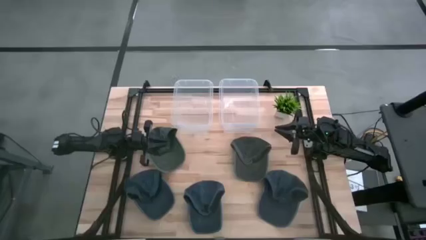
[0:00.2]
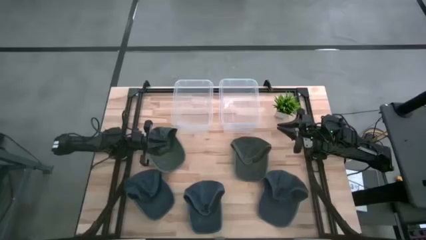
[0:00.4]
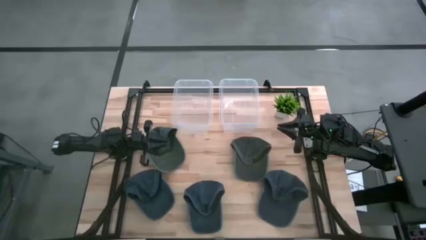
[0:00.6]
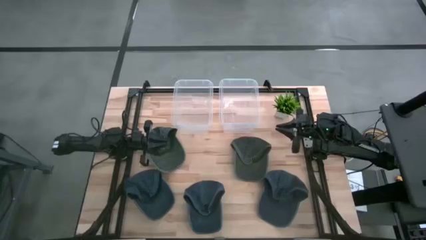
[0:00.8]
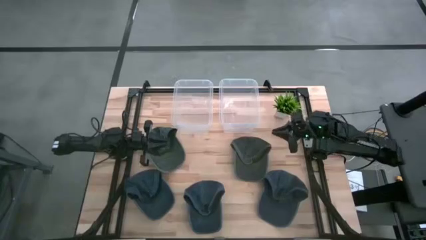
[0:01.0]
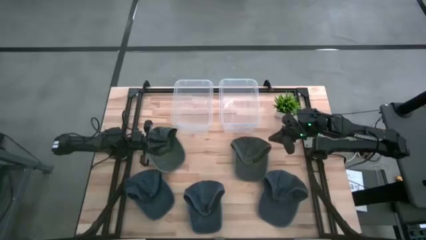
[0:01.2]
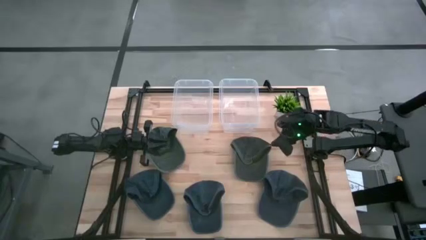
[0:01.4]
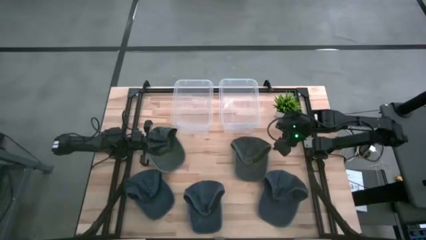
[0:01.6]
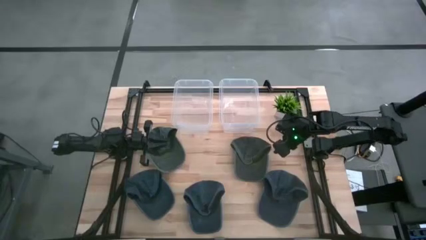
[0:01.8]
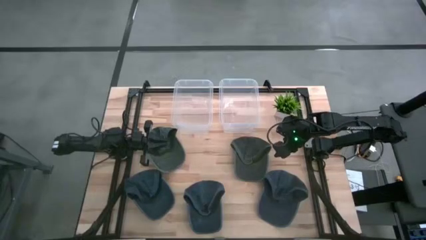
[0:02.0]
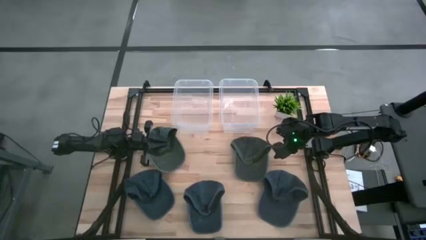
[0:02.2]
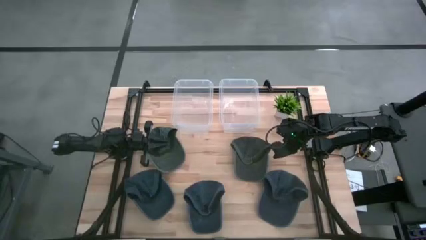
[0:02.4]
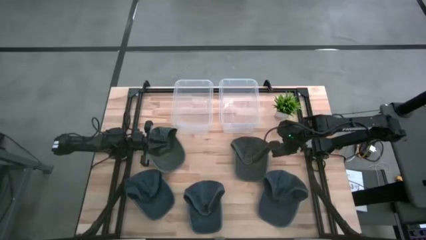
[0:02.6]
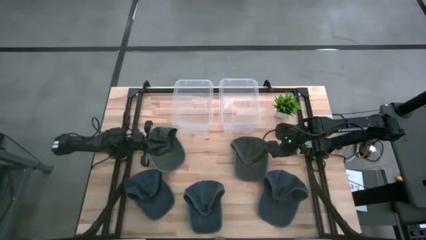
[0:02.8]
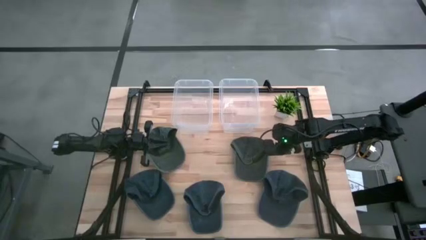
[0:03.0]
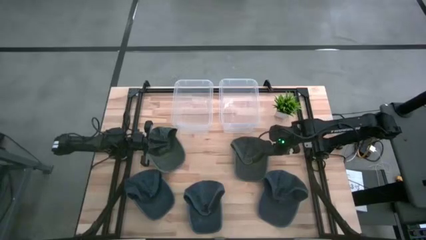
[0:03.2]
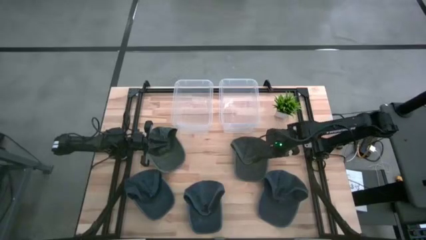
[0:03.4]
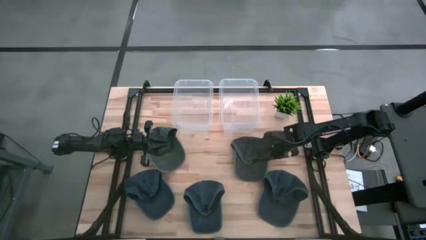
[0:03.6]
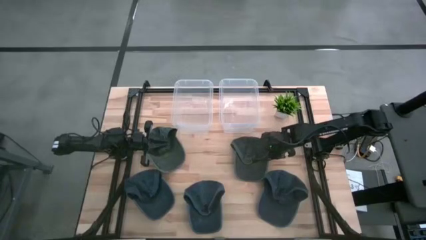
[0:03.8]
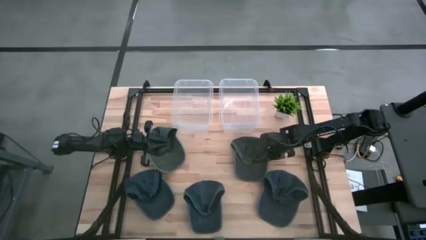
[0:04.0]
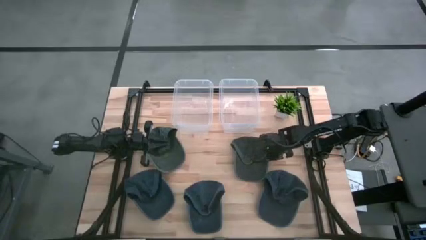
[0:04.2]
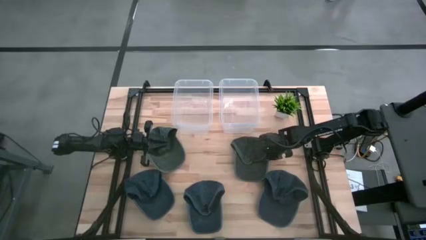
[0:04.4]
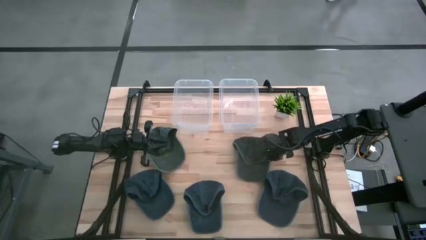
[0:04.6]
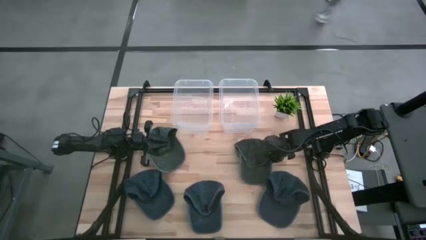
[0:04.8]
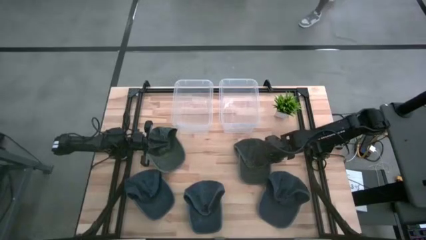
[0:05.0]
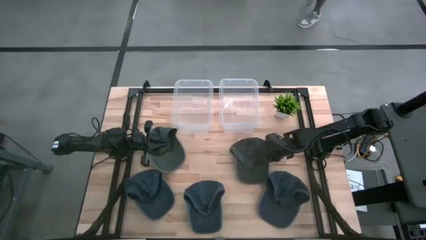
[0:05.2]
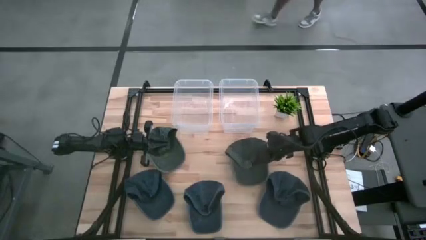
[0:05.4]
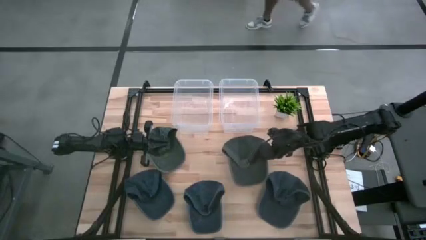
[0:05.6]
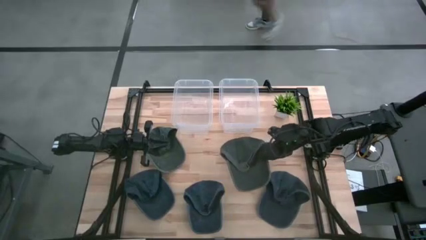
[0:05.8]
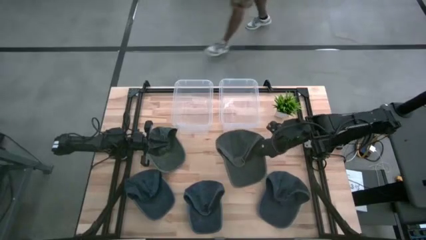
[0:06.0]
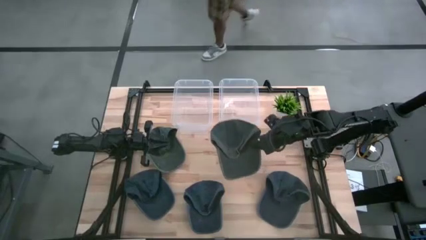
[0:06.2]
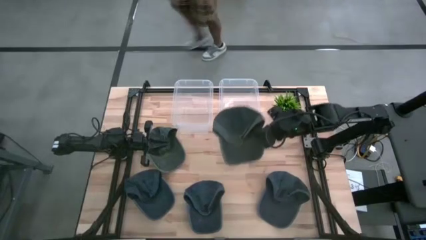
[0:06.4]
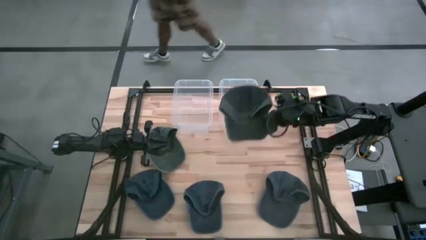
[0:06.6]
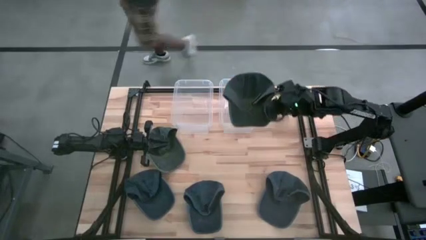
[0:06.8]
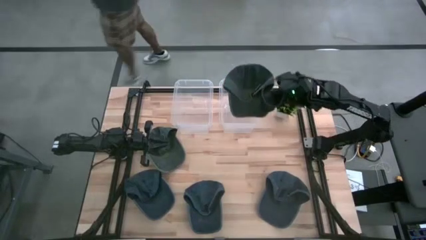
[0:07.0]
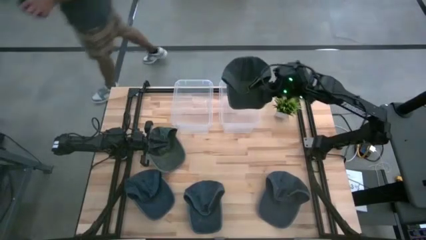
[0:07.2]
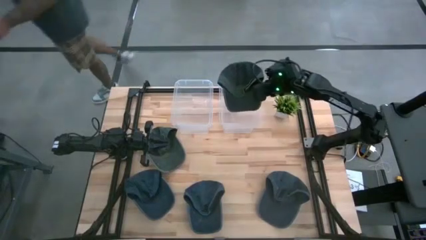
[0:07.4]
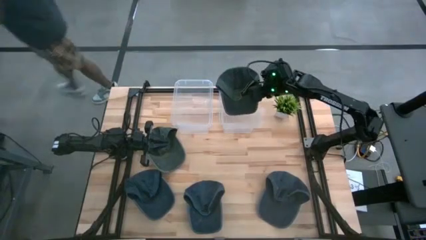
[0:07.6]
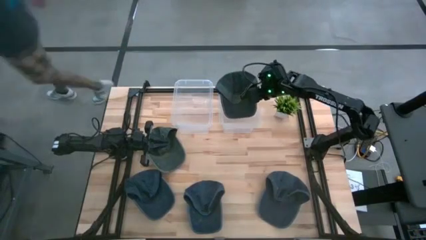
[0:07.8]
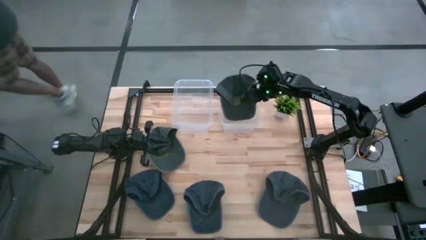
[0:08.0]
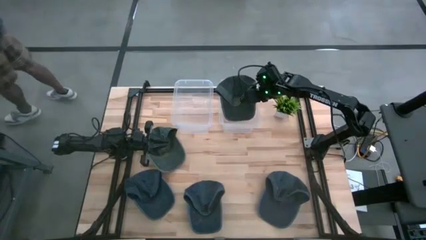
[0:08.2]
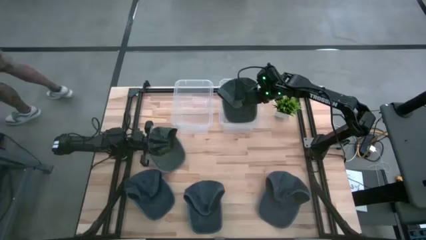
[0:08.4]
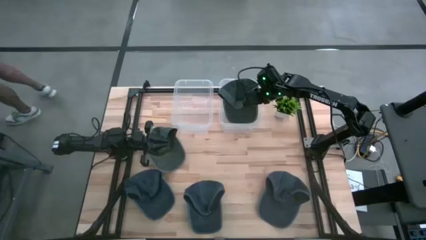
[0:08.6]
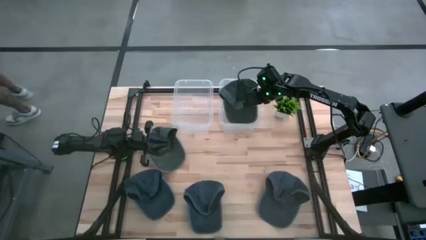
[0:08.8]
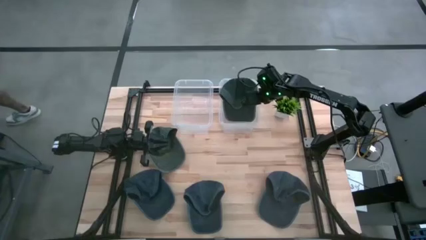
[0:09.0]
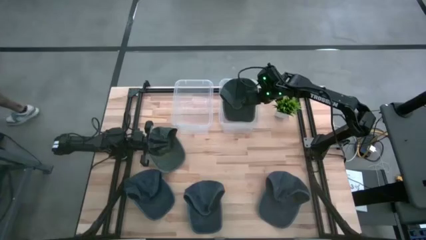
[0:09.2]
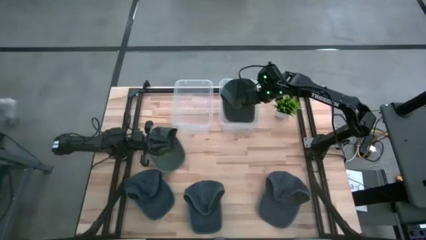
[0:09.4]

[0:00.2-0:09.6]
Task: Pick & Place hat
Put the right gray cap into the right transparent bin

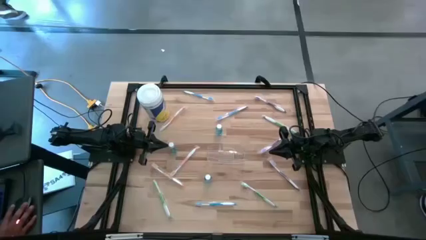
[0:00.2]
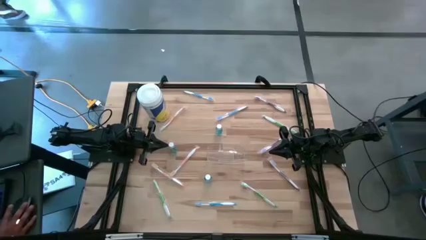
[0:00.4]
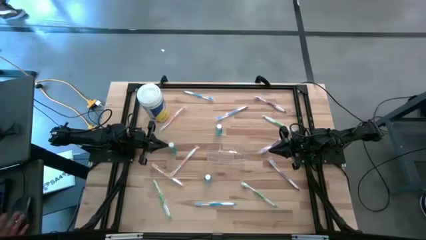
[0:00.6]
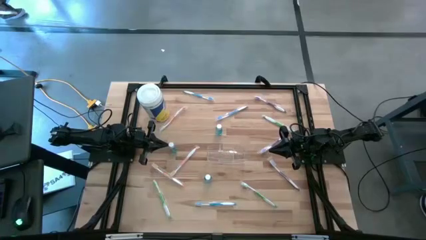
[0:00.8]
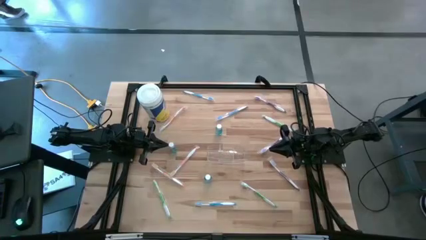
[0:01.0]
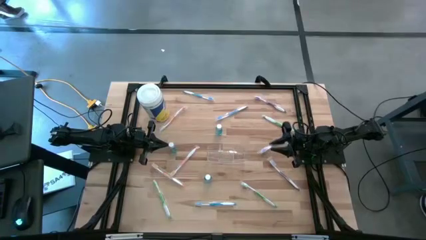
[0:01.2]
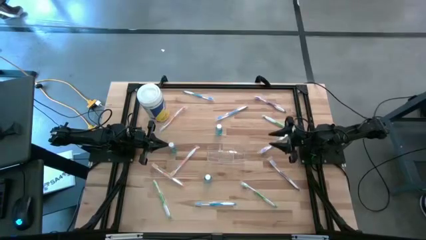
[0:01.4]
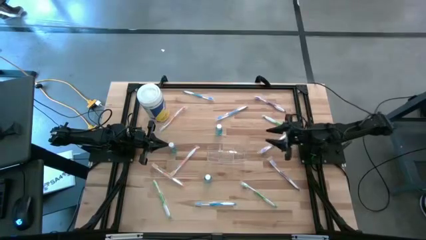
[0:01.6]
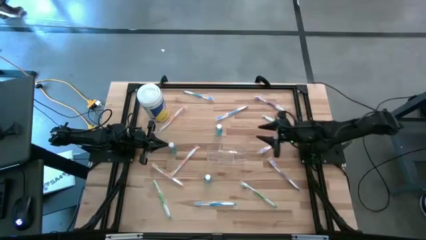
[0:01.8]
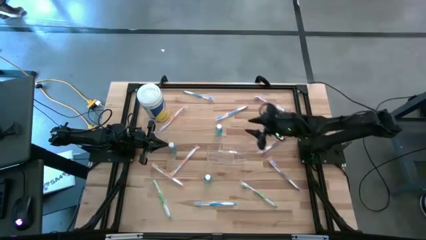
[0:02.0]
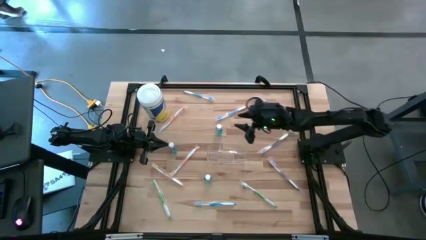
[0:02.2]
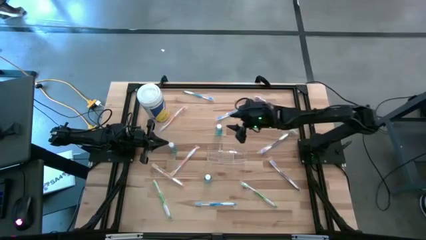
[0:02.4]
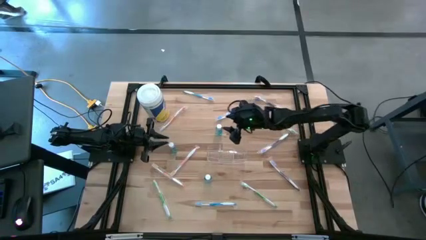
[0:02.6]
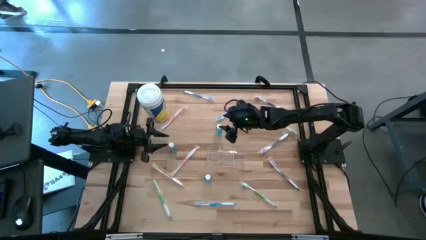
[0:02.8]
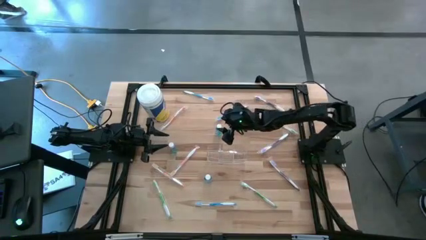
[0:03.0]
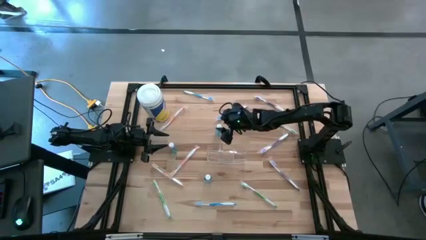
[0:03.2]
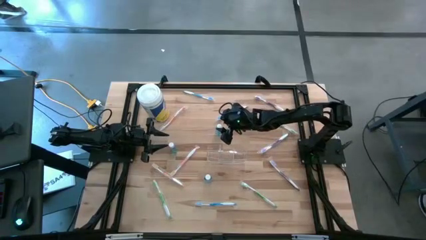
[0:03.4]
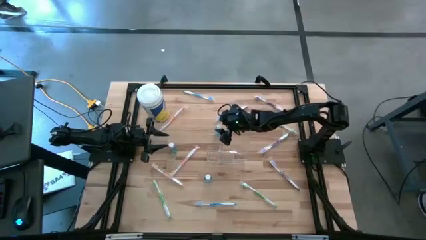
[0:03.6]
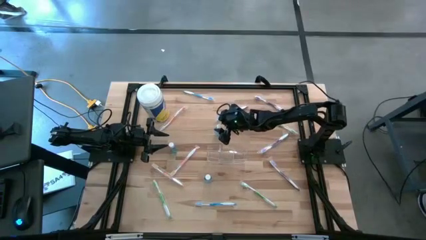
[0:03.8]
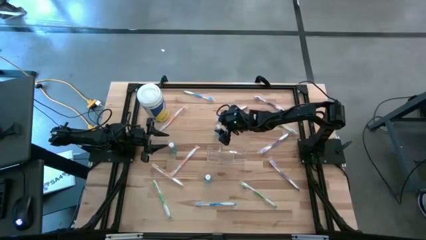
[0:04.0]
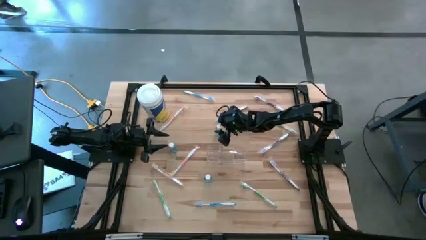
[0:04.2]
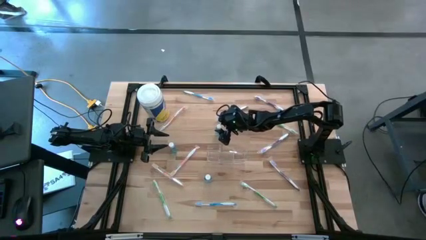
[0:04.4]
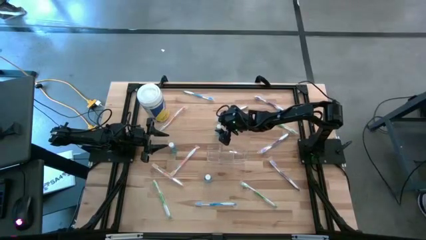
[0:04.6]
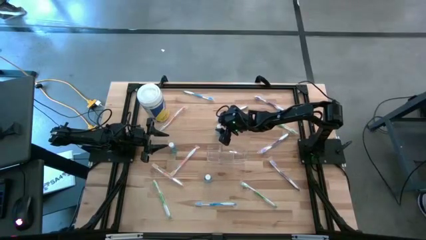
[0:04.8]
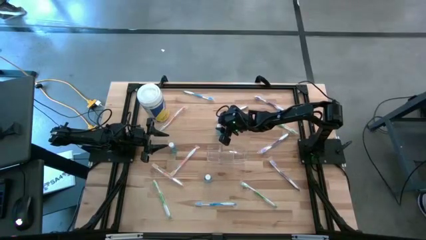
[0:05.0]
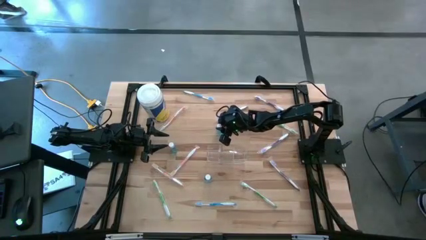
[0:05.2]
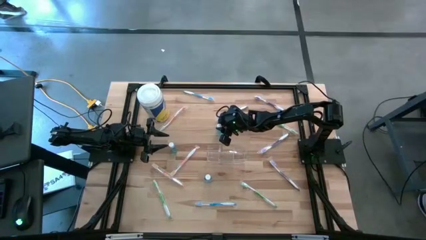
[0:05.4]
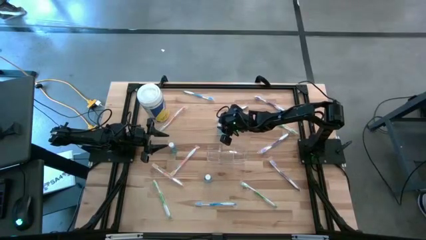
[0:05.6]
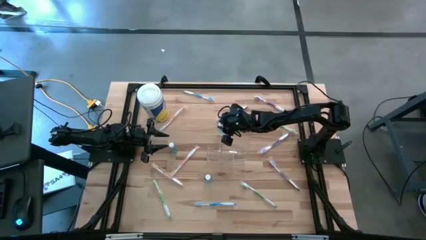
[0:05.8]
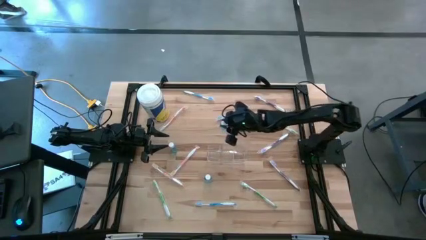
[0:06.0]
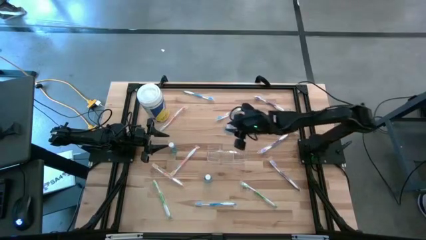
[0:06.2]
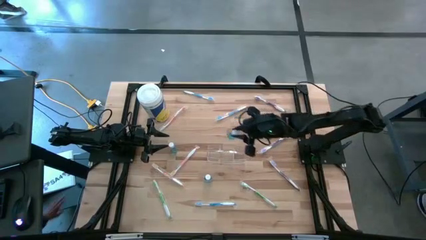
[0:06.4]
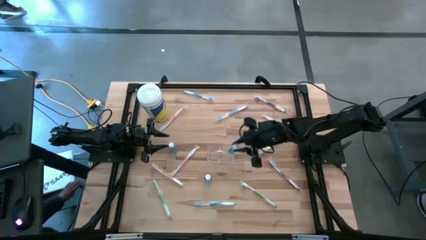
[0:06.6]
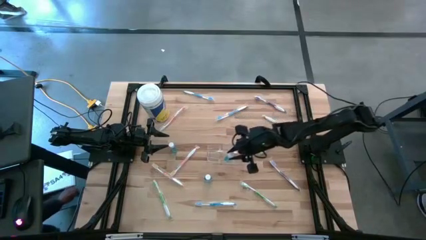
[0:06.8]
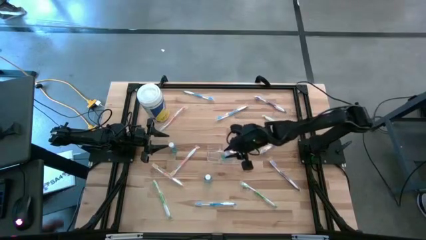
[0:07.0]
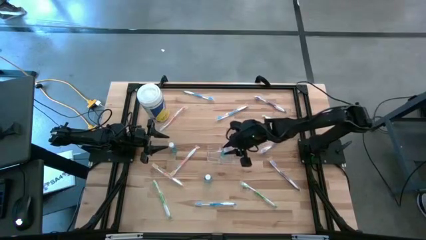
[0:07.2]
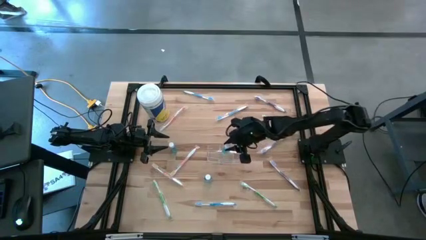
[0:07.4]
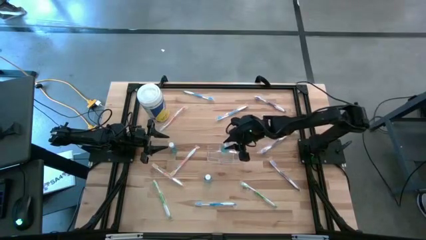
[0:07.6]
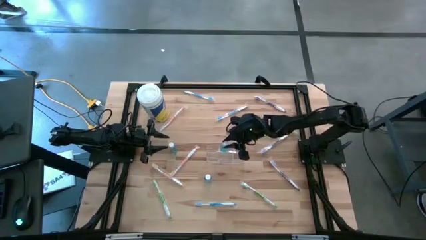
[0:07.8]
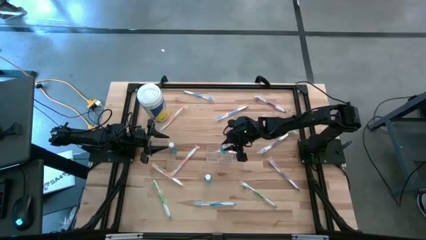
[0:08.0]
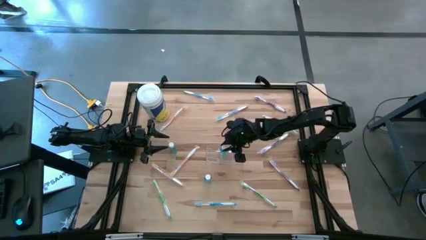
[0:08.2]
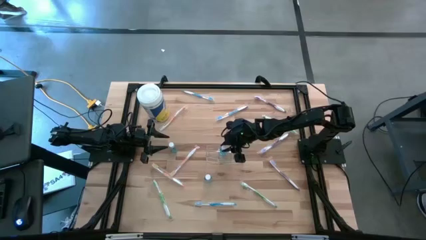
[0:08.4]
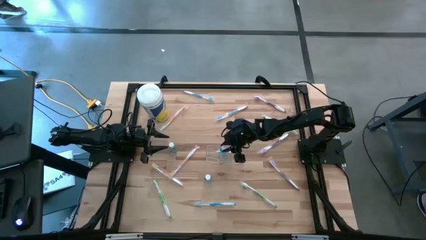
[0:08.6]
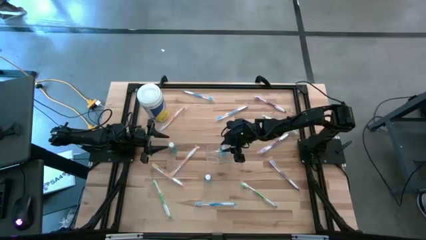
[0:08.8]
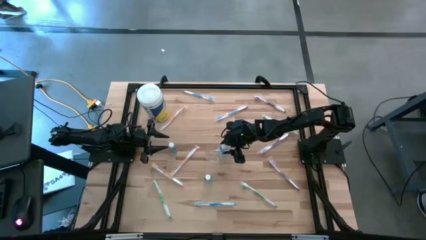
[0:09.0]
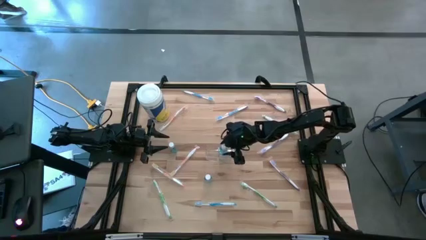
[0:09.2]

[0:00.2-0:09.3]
Task: Pick & Place toothbrushing station
Put the top blue mouthwash into the transparent organizer
